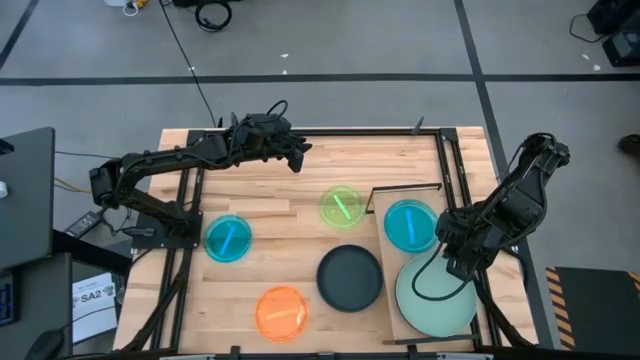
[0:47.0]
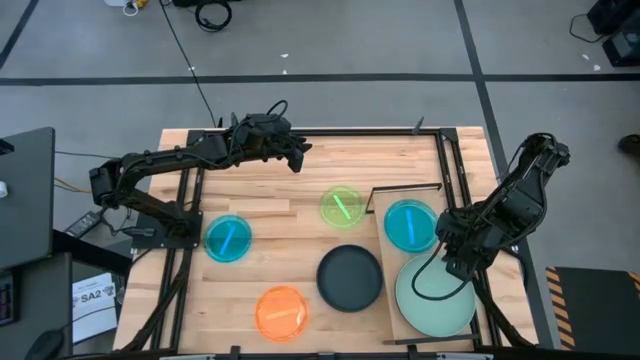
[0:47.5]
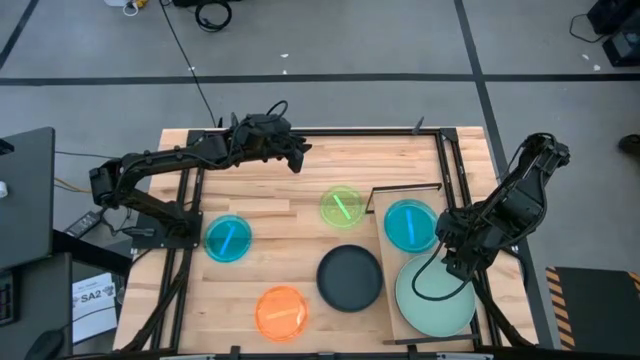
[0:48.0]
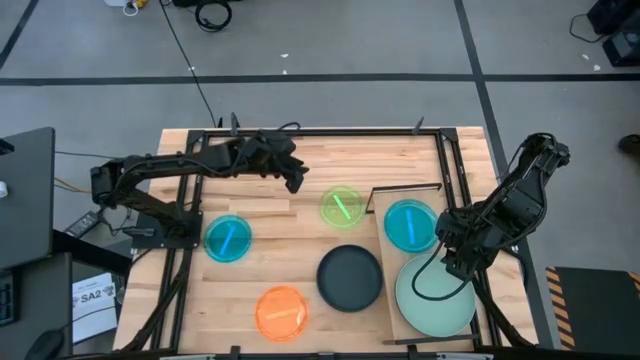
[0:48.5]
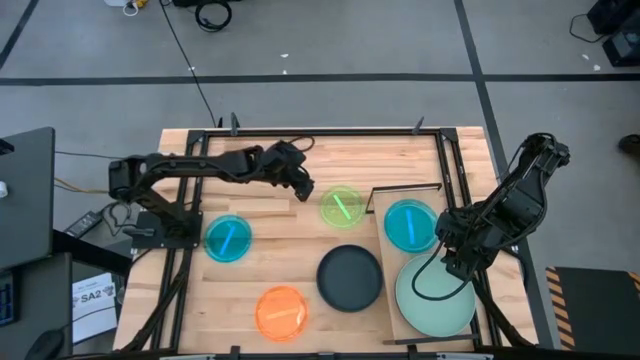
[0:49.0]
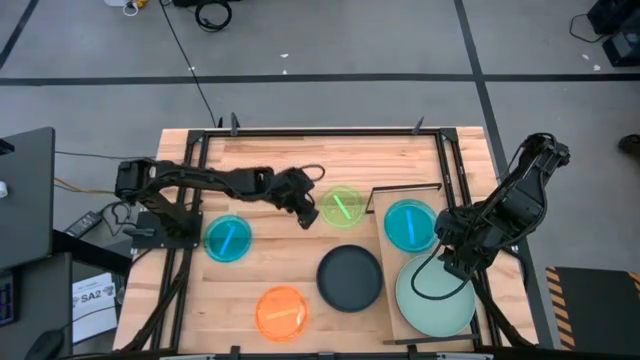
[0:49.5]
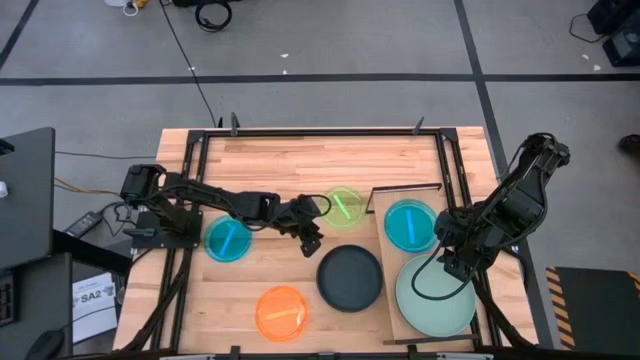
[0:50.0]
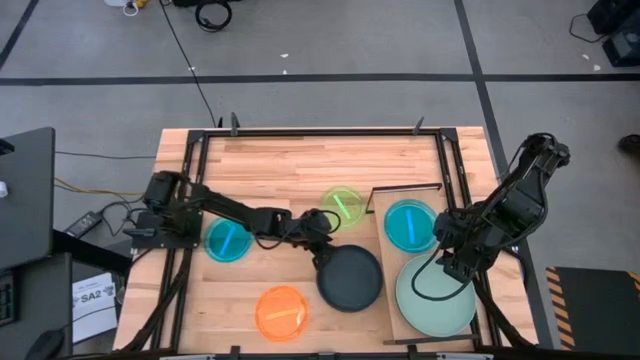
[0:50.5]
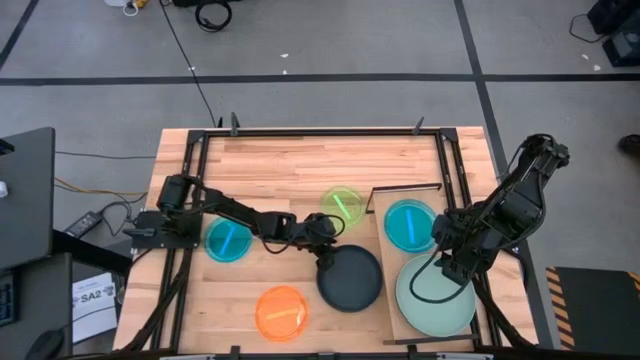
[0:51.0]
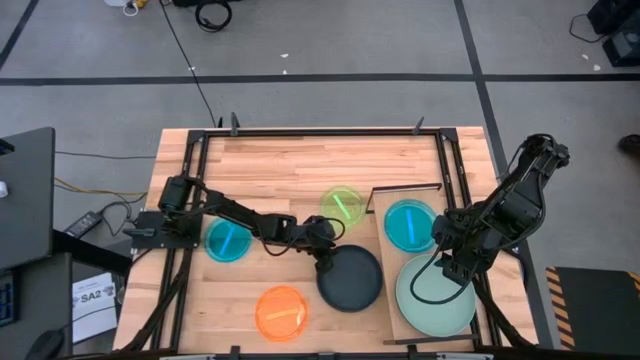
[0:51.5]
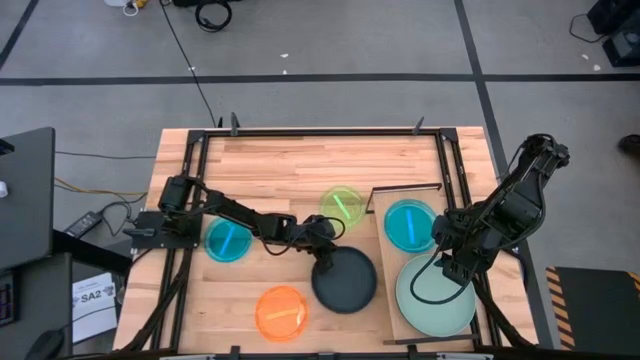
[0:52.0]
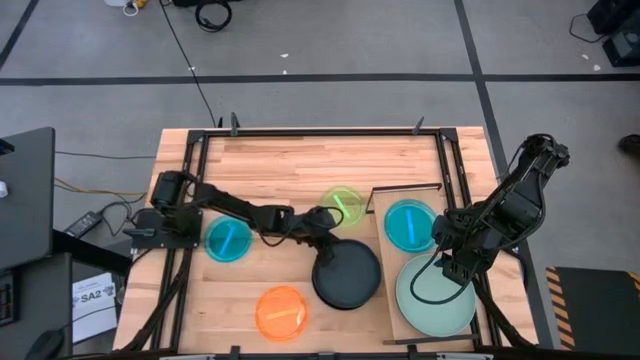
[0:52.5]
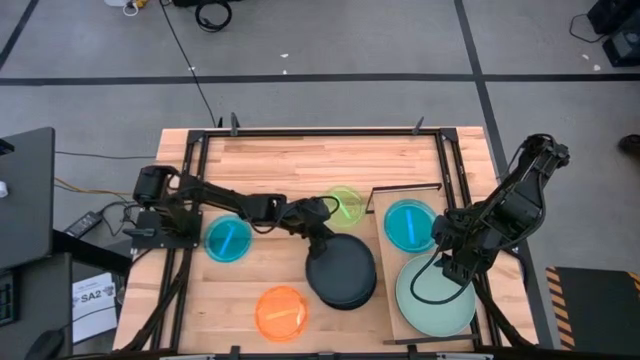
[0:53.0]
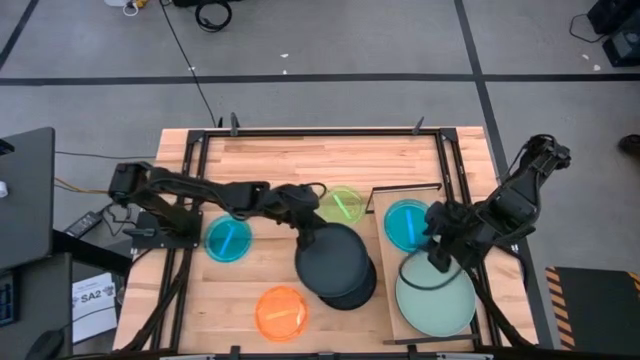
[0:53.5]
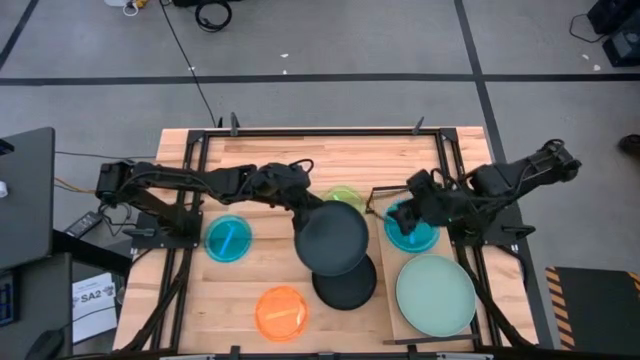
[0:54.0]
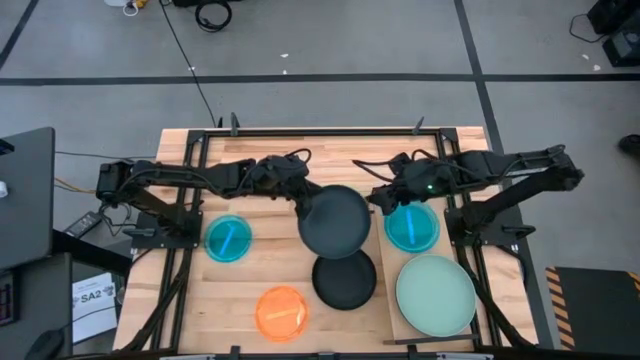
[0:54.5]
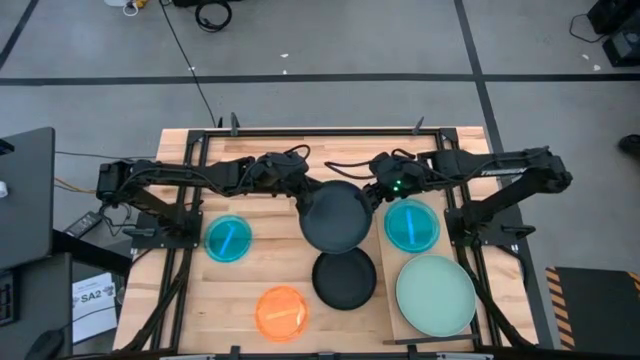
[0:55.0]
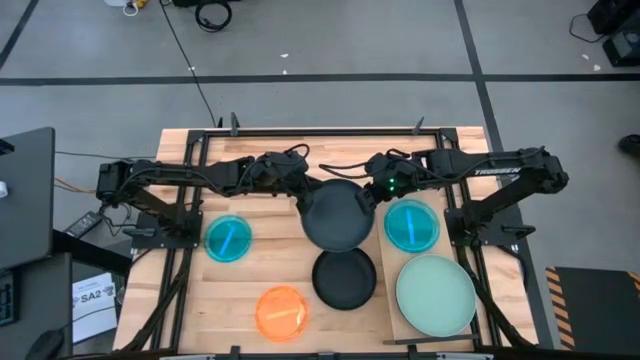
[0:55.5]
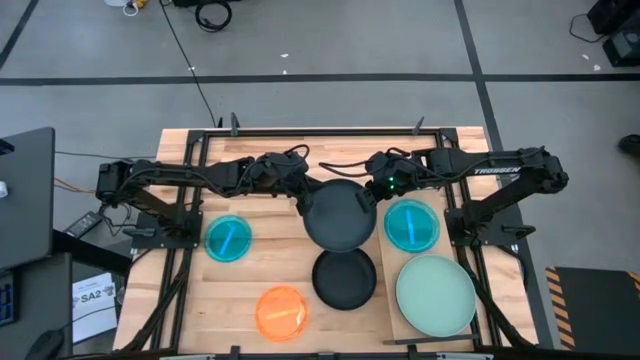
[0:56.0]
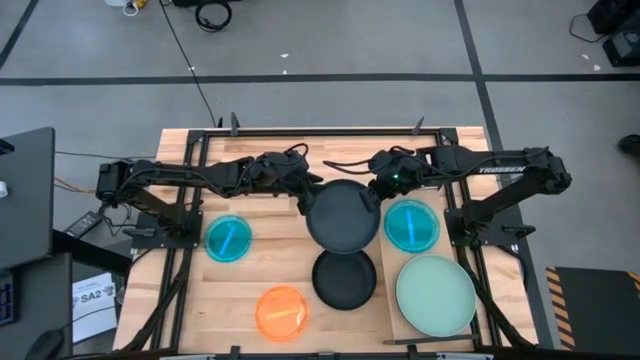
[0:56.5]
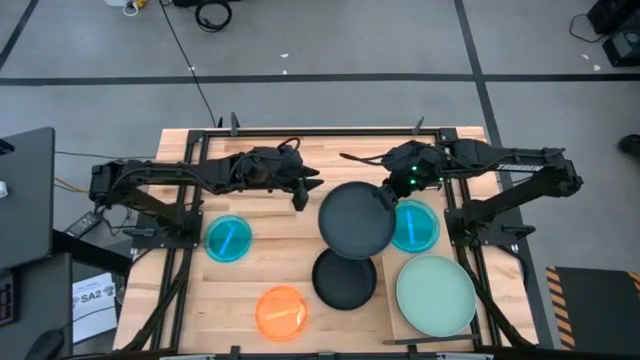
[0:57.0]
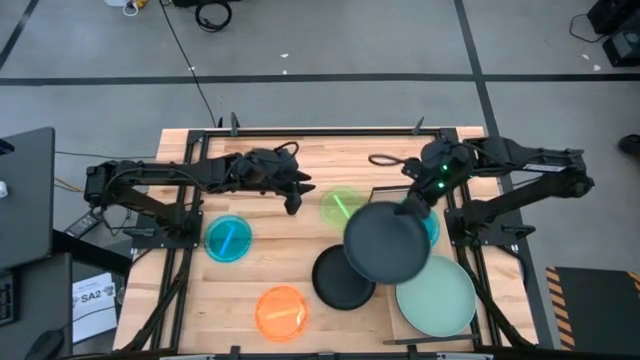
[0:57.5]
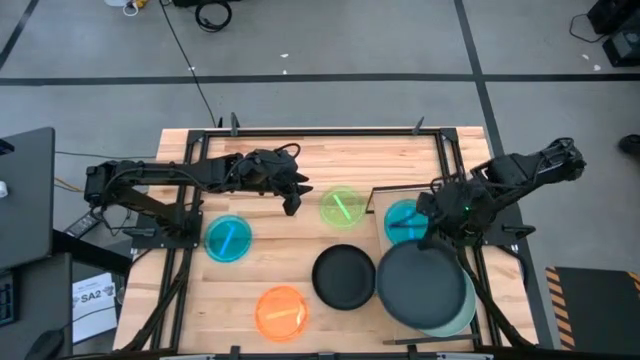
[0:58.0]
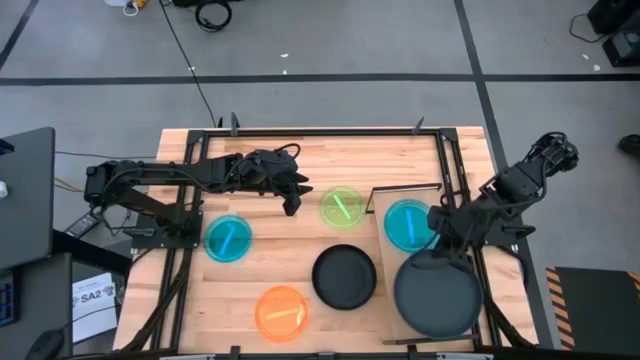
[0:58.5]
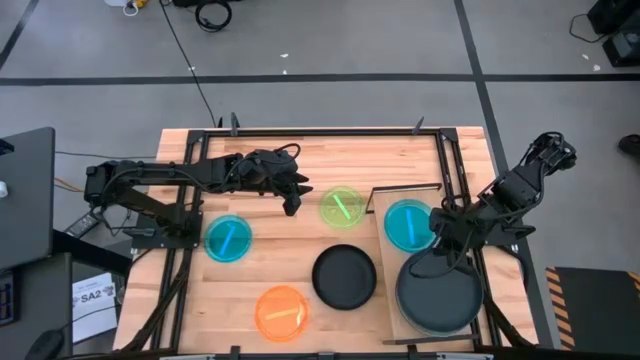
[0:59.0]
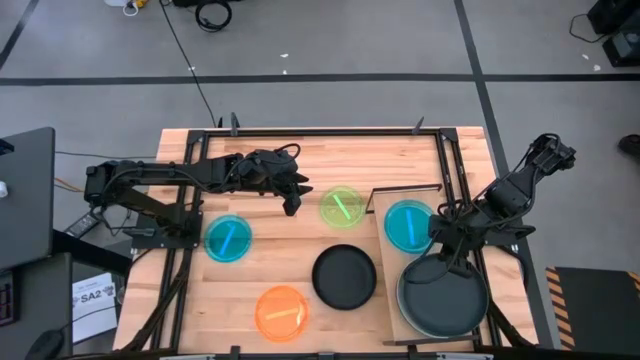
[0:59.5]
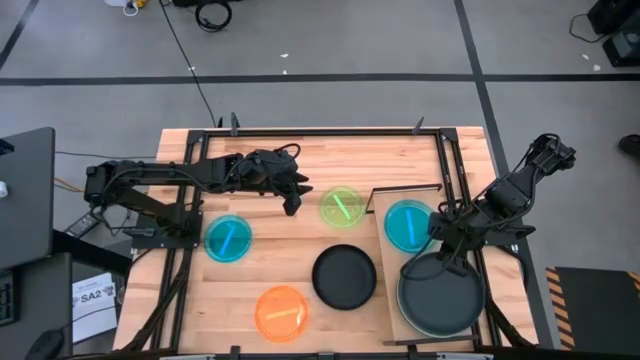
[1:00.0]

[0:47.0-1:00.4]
Task: Place and stack plates onto a shelf
Stack the black plate on top of the gray plate on the shelf

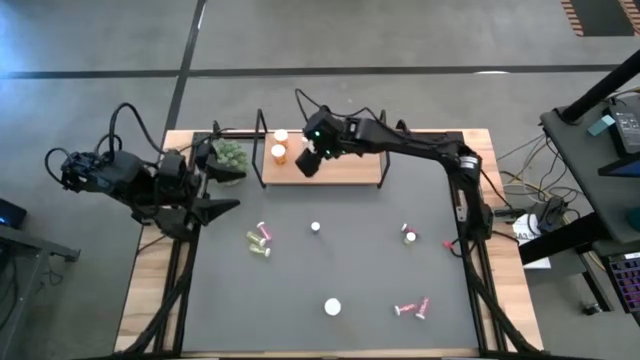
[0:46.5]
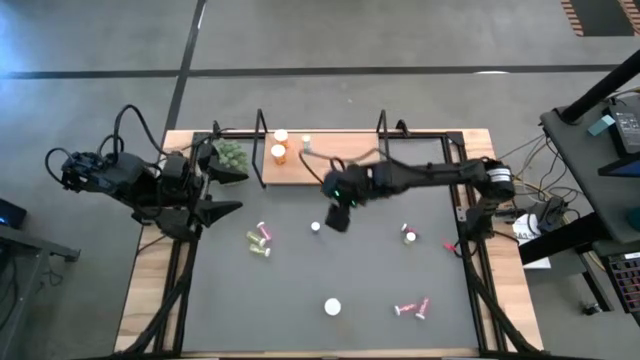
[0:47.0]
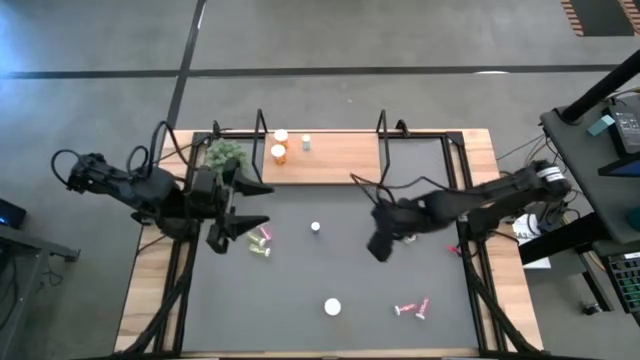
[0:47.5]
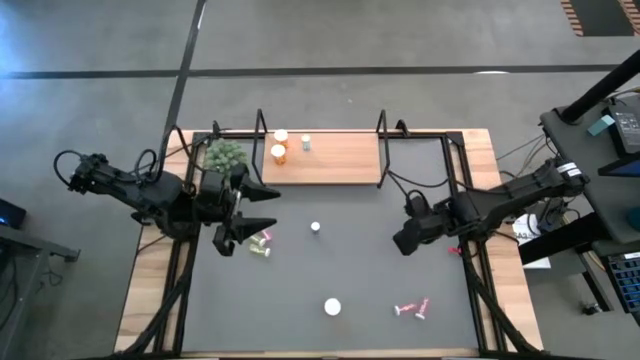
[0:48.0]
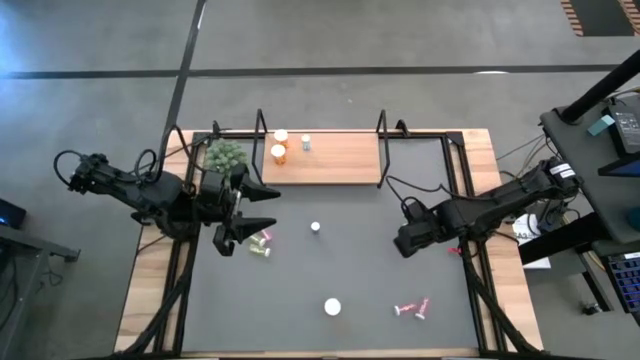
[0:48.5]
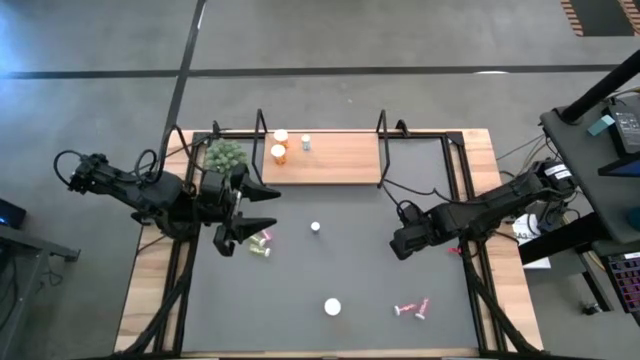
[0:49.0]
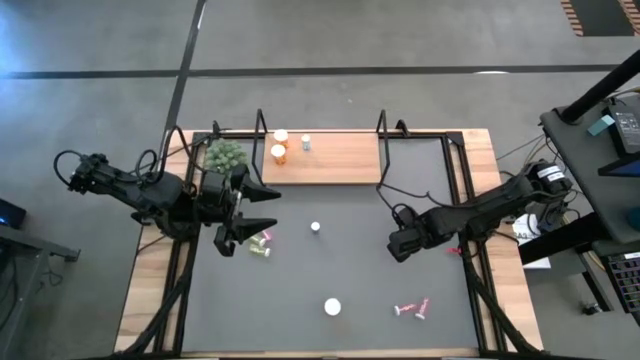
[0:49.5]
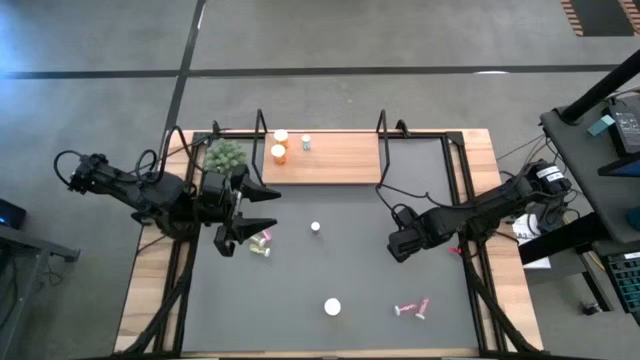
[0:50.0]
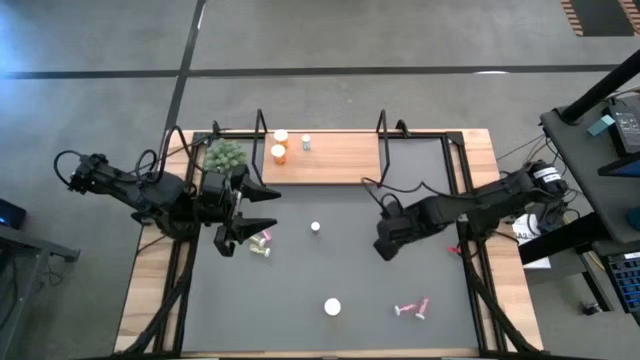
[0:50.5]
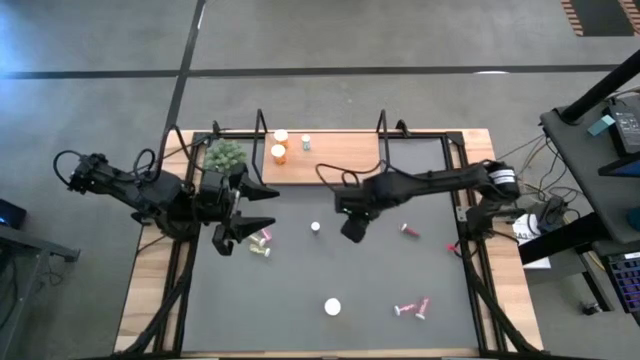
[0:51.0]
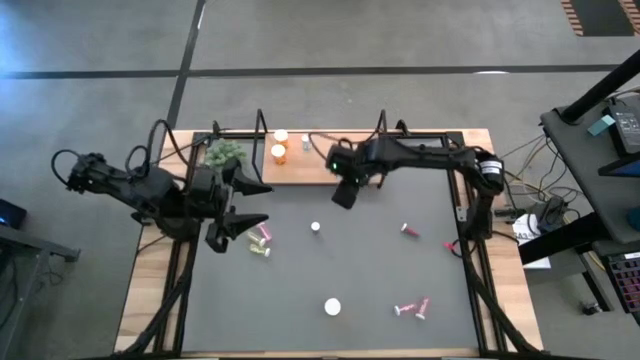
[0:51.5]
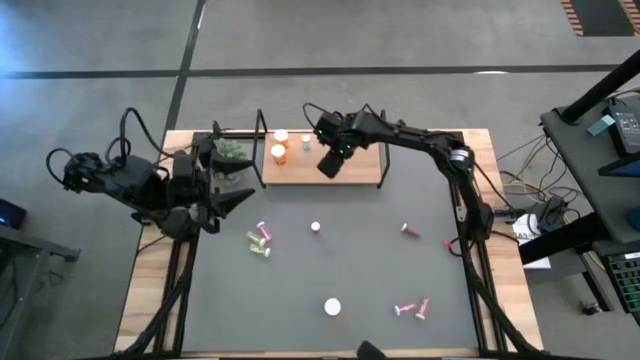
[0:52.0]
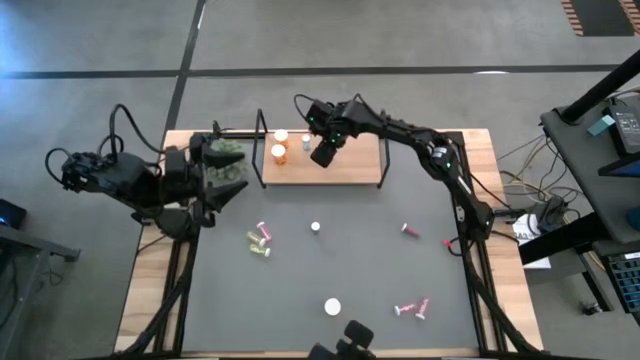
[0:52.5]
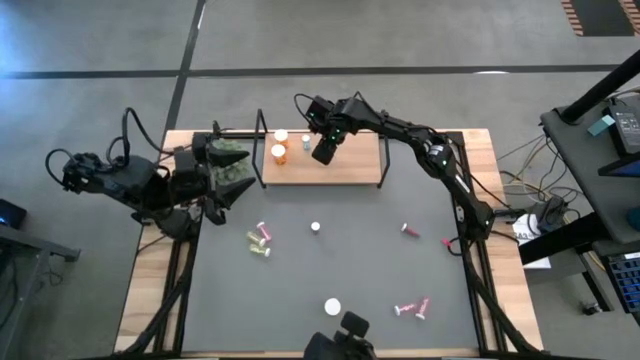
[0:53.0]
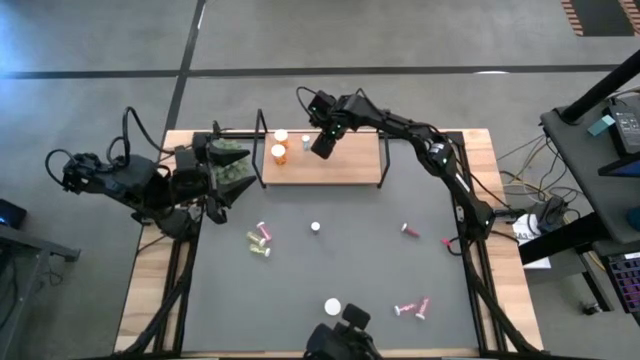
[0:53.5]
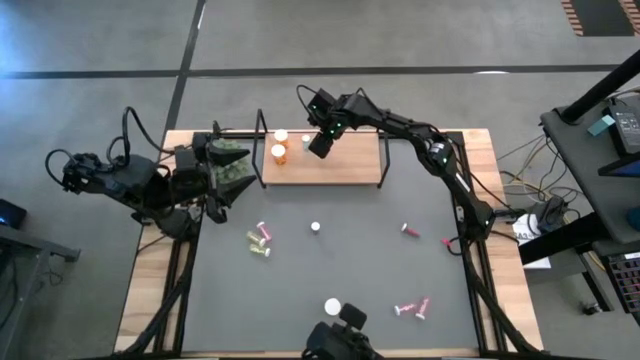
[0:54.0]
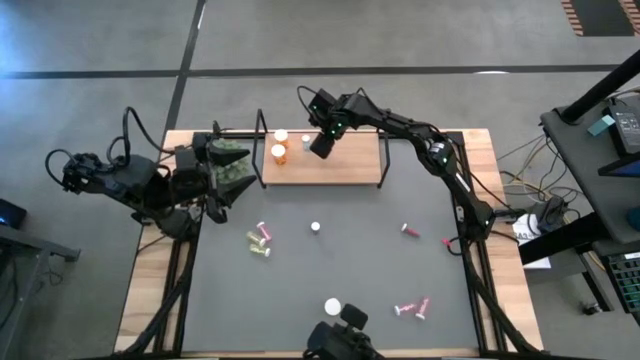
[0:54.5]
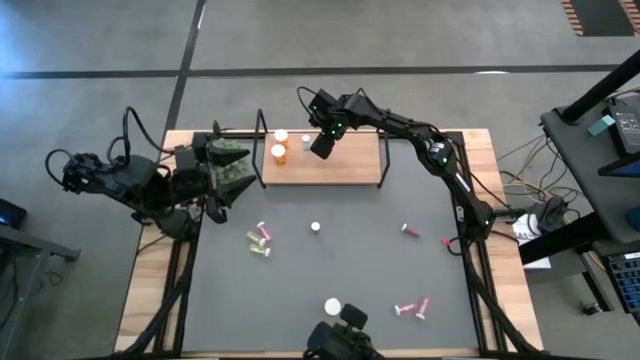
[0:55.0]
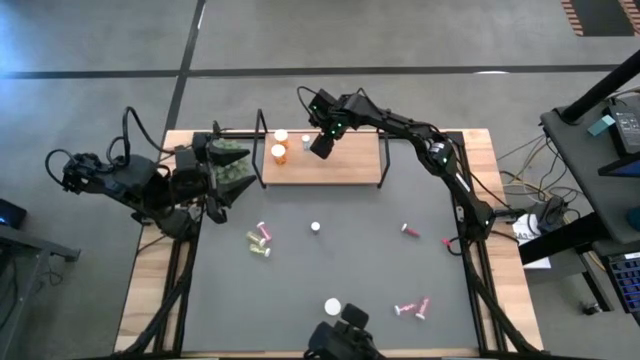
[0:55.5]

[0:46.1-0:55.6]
Task: Pick and place medicine bottles onto shelf by color
Put the right yellow pill bottle on the shelf
